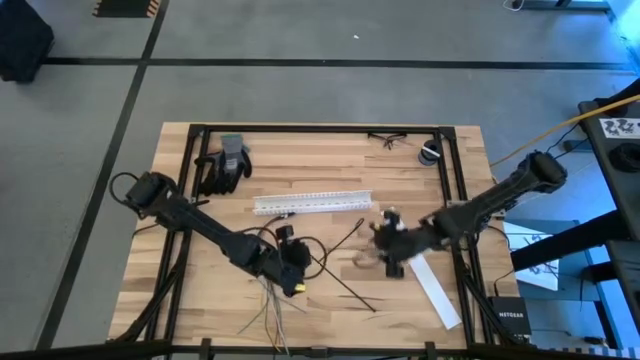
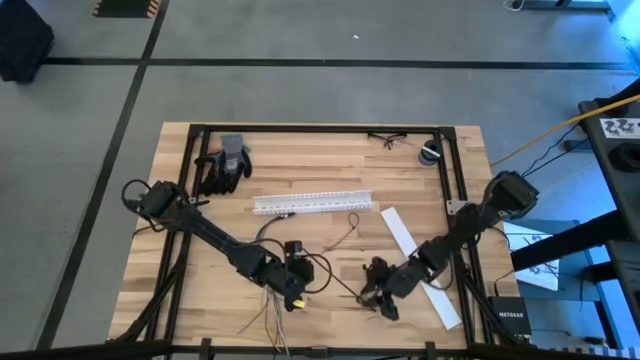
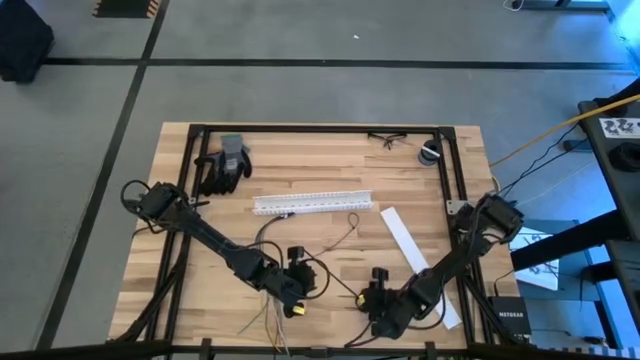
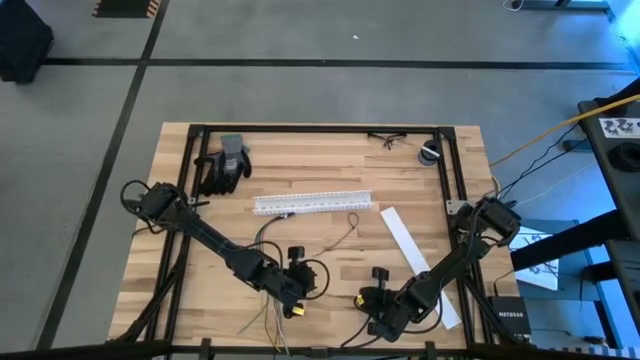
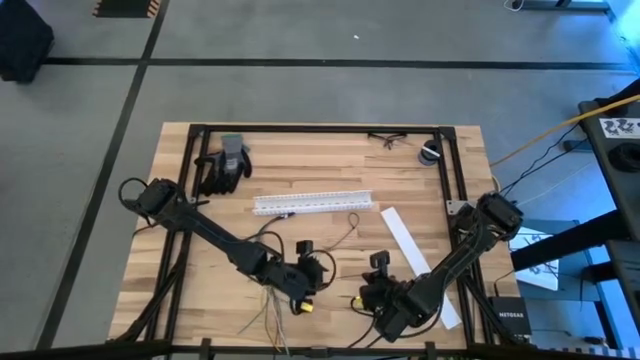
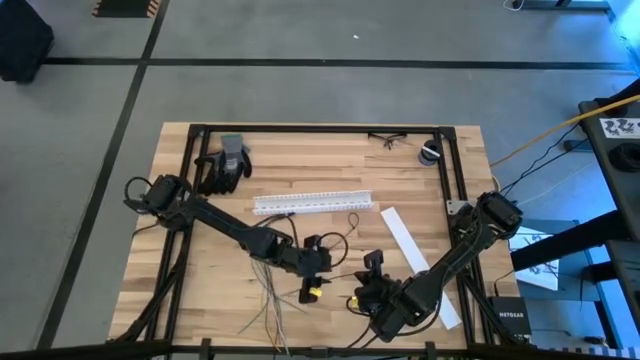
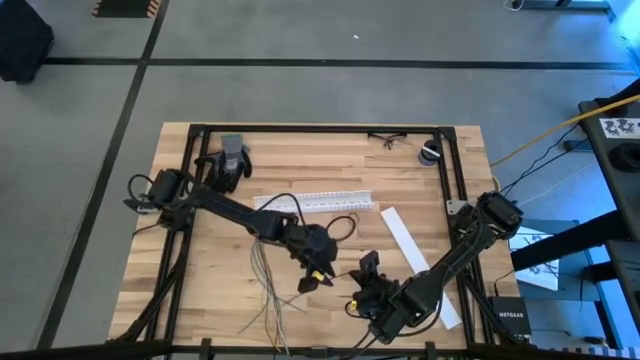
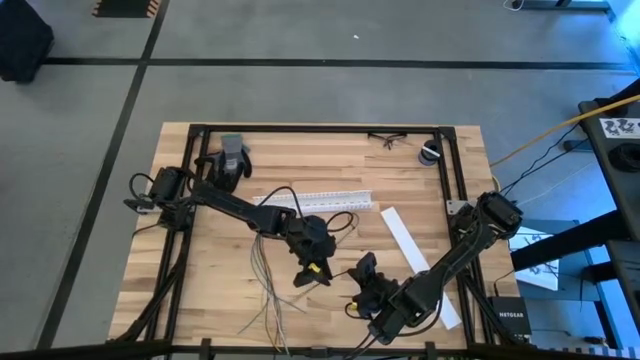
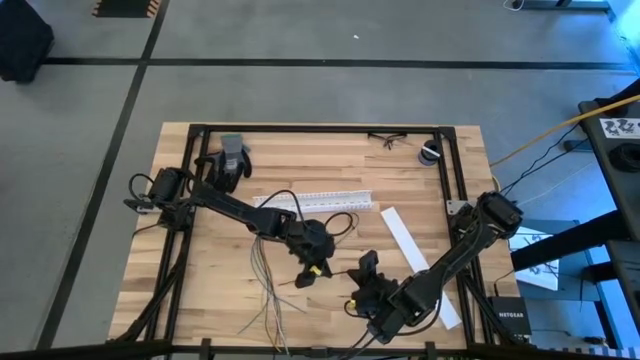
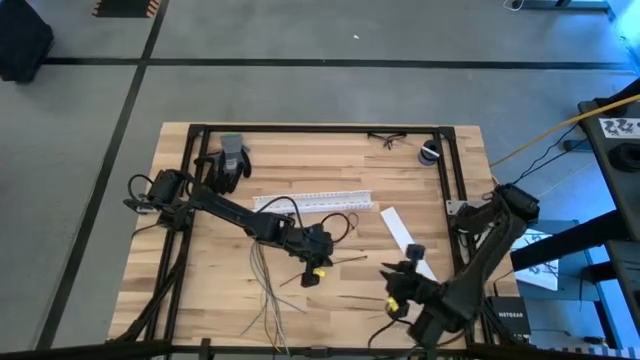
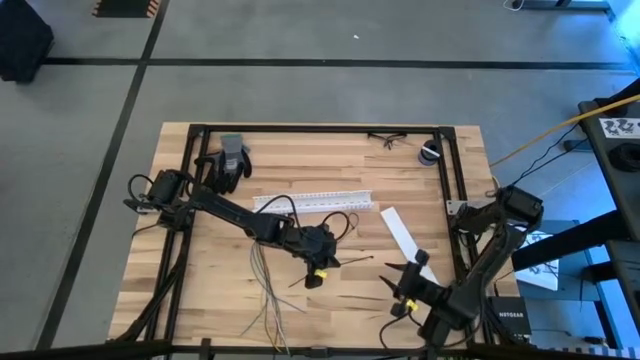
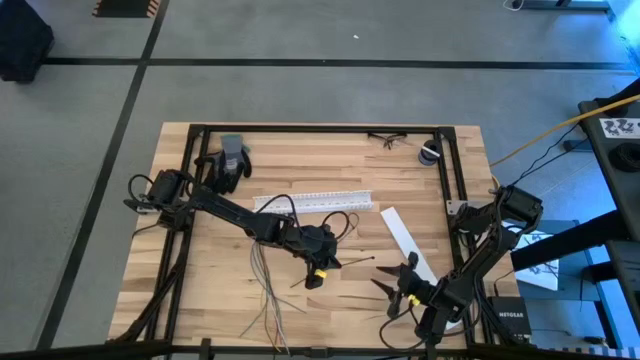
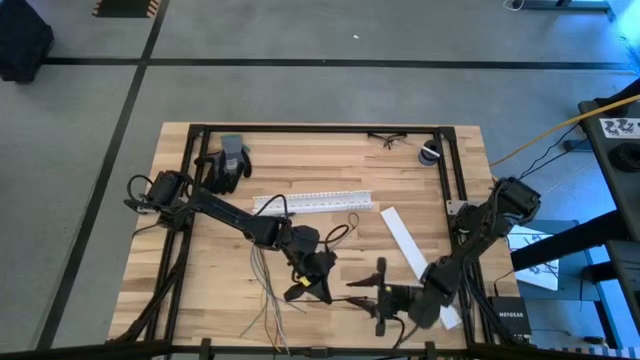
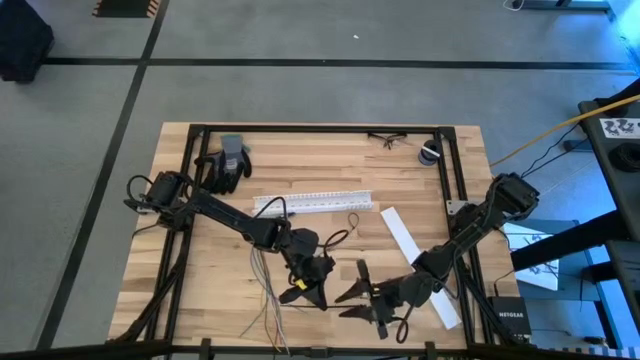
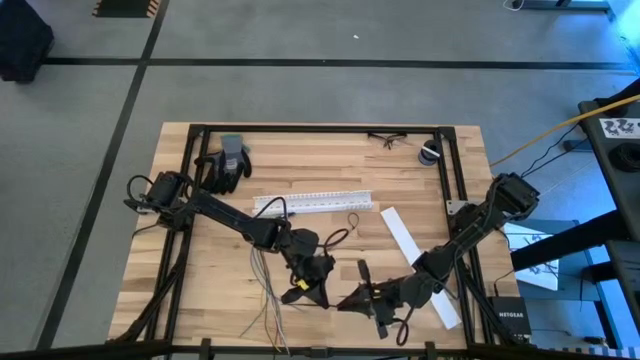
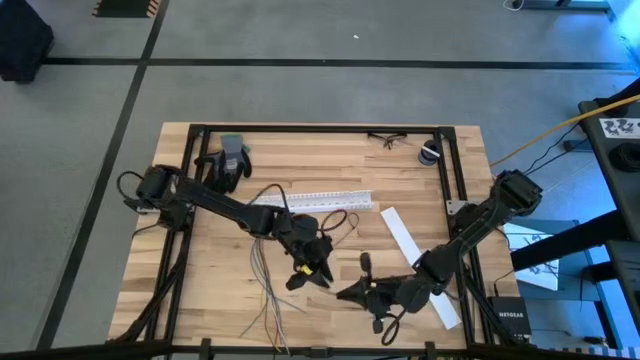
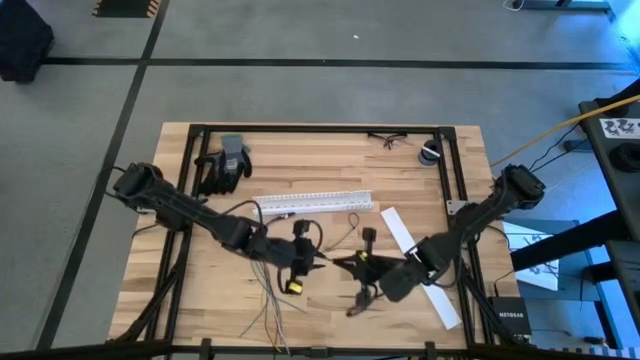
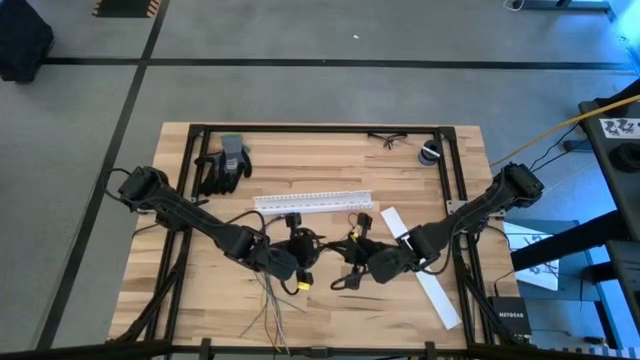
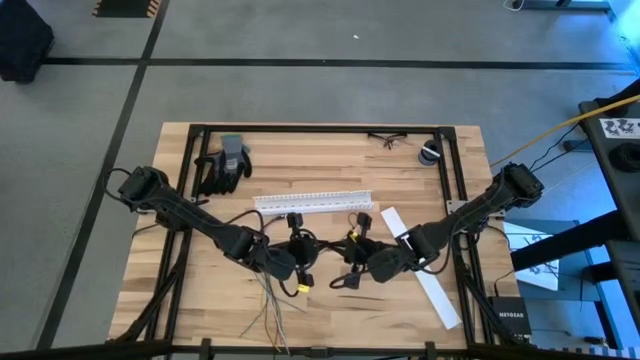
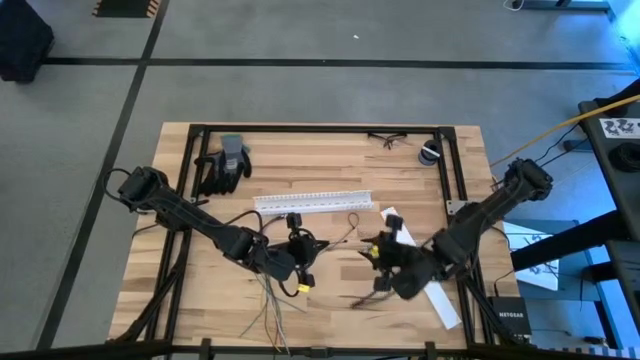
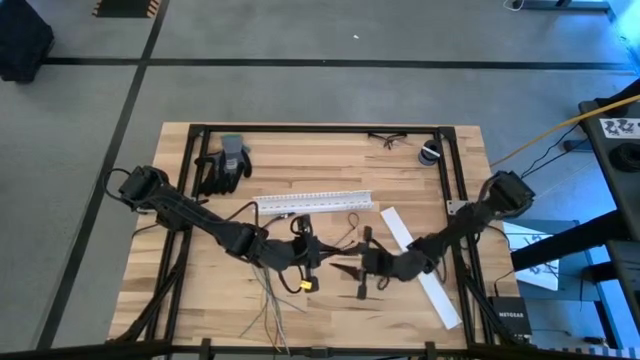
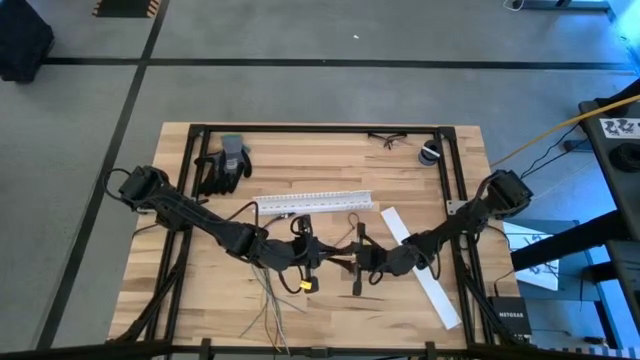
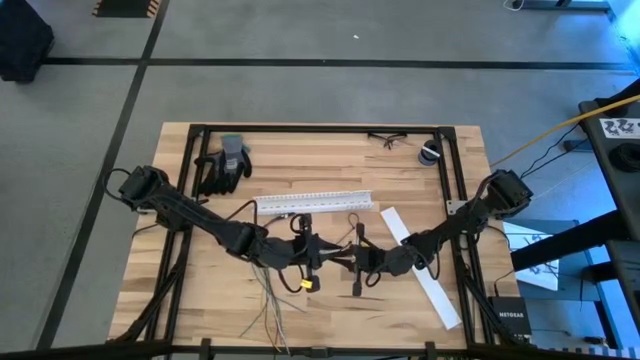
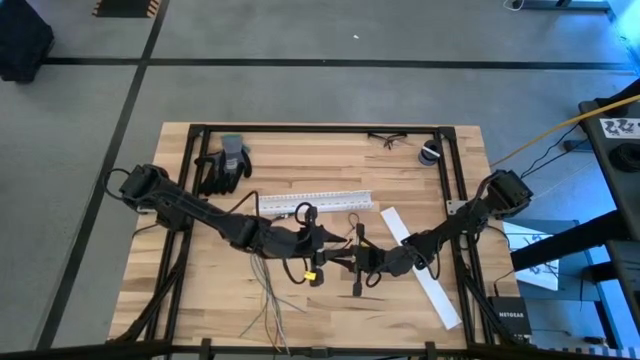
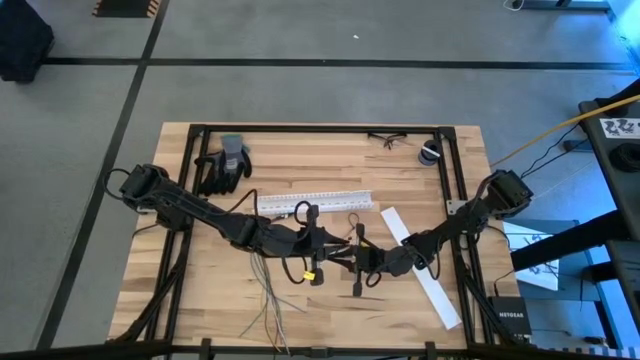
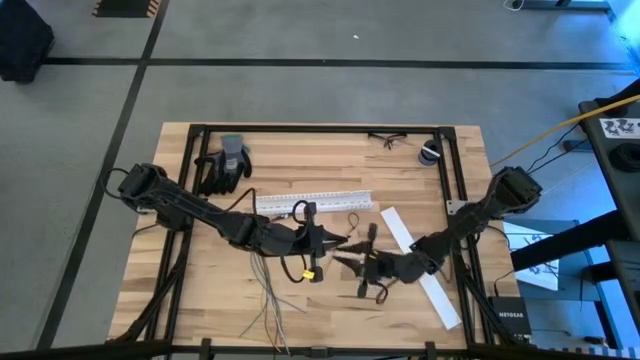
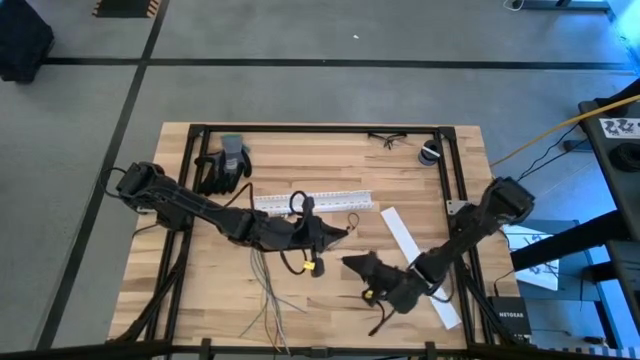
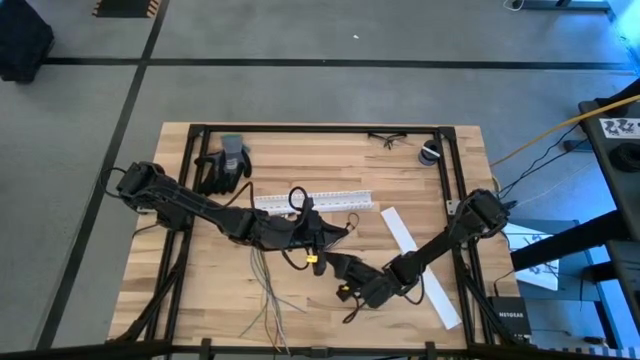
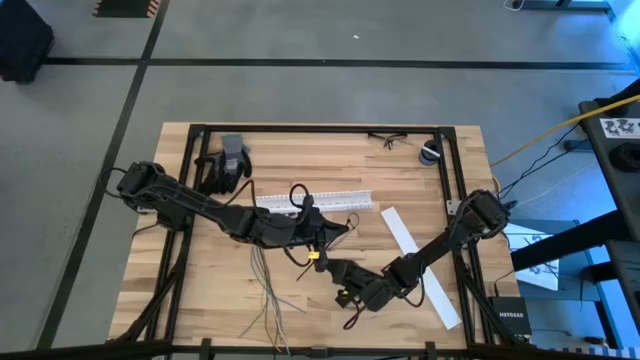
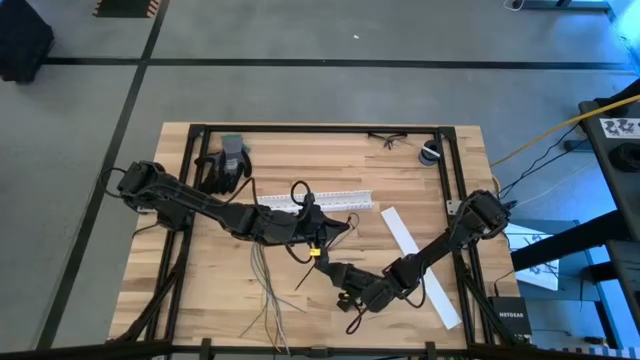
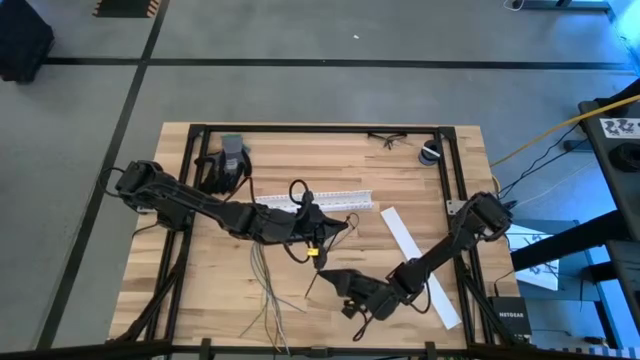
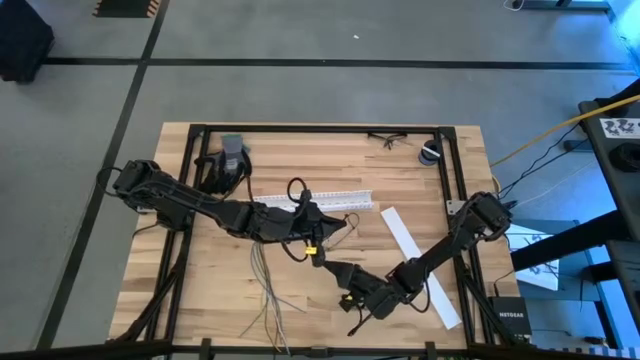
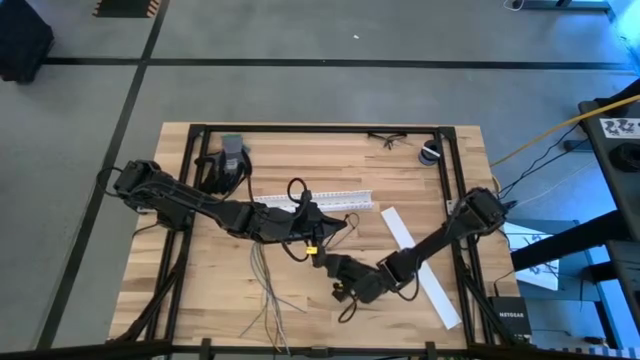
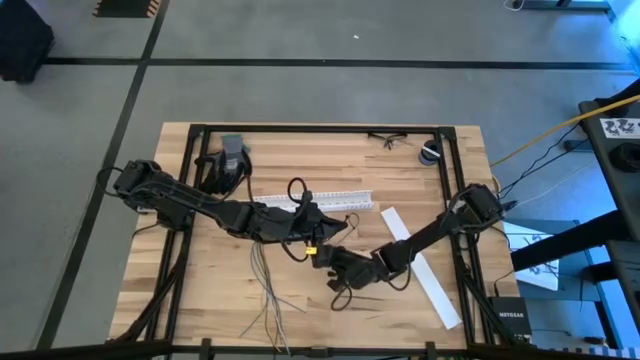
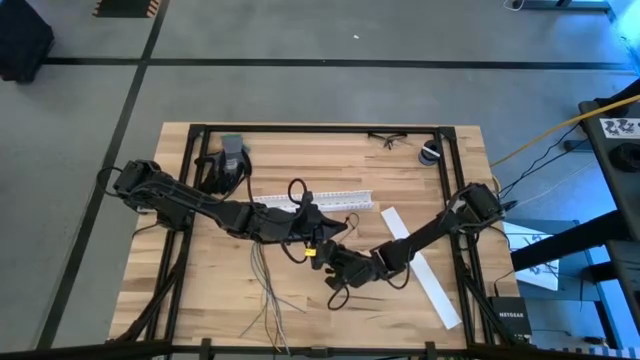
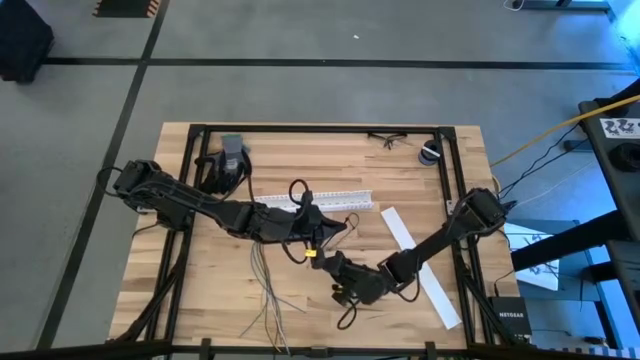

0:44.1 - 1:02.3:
Task: Ziptie cables
Prepare the black ziptie
